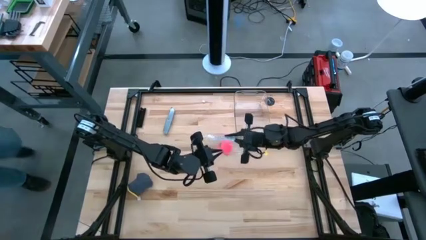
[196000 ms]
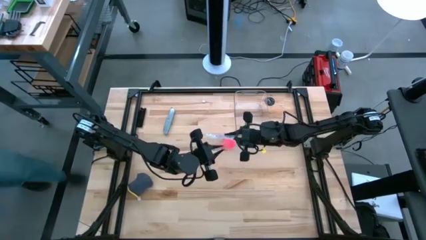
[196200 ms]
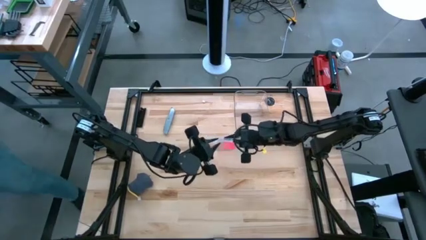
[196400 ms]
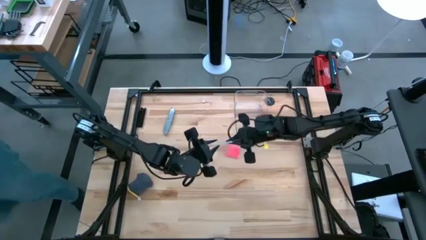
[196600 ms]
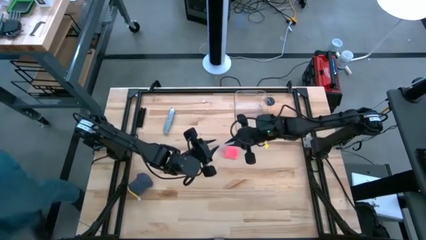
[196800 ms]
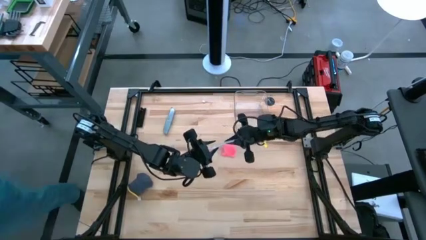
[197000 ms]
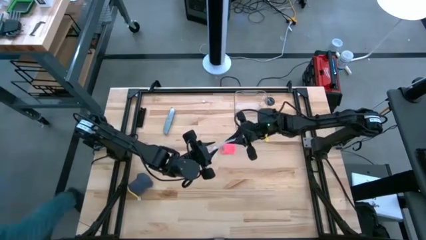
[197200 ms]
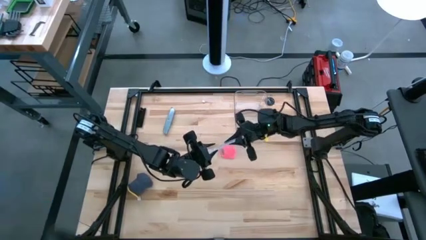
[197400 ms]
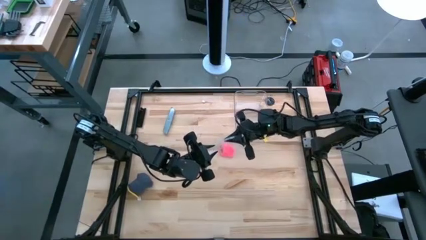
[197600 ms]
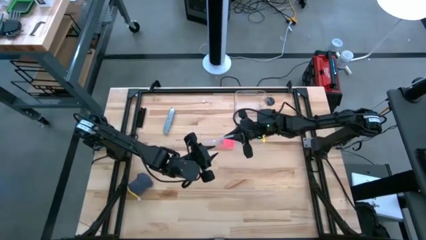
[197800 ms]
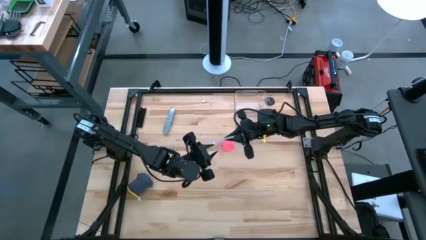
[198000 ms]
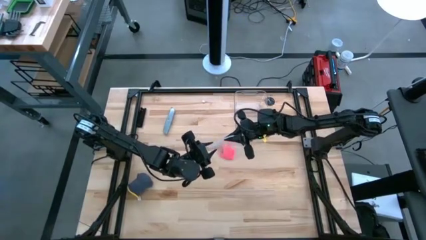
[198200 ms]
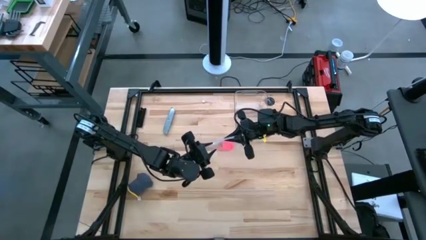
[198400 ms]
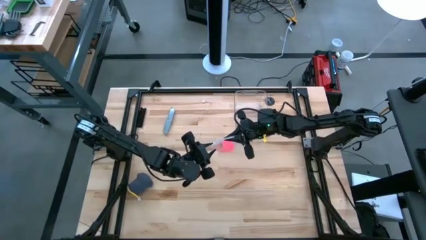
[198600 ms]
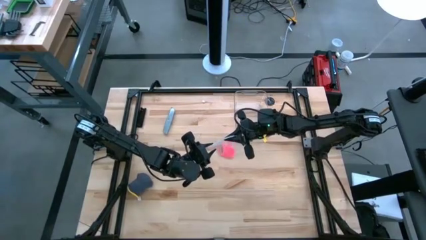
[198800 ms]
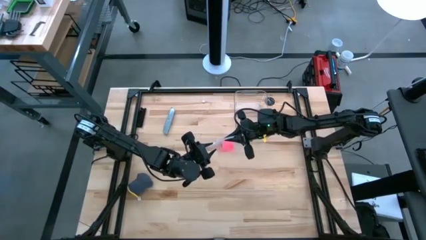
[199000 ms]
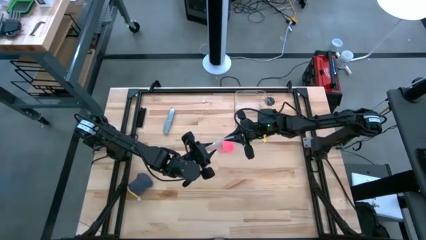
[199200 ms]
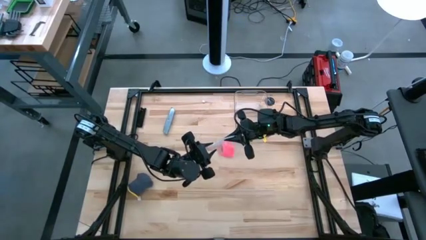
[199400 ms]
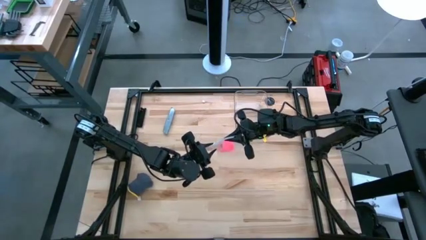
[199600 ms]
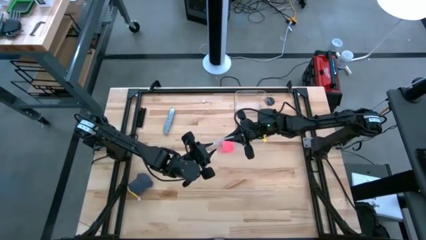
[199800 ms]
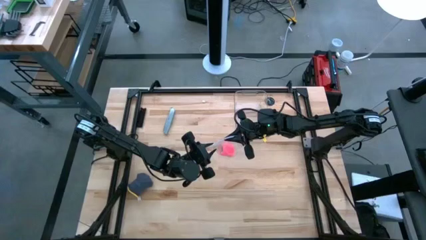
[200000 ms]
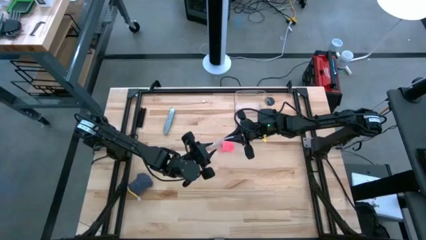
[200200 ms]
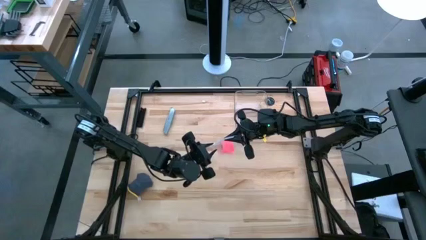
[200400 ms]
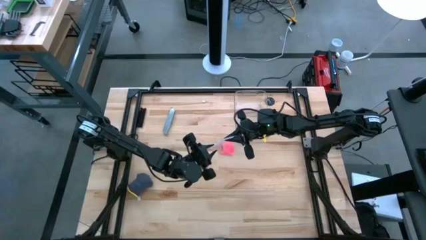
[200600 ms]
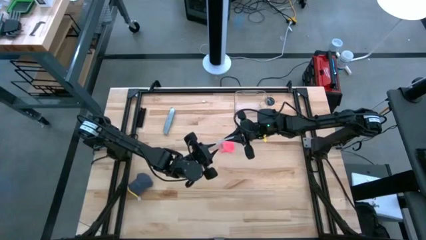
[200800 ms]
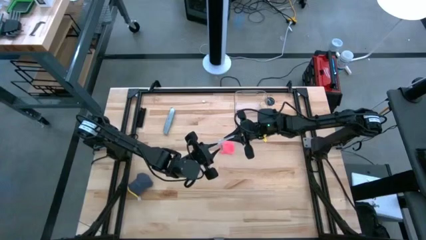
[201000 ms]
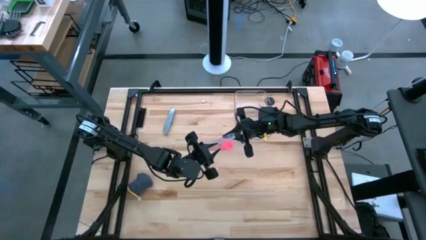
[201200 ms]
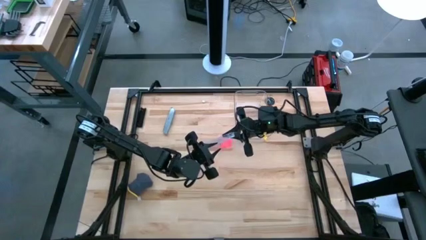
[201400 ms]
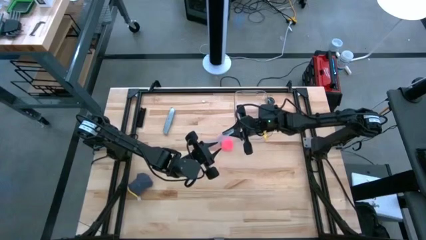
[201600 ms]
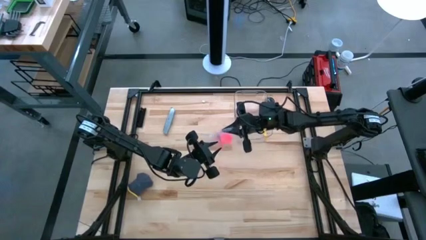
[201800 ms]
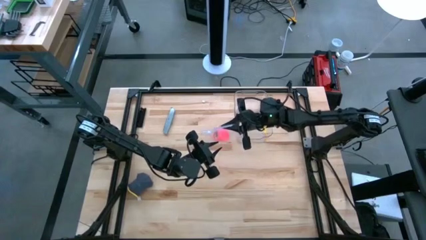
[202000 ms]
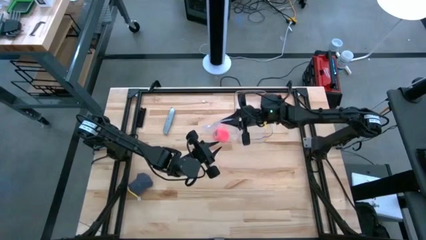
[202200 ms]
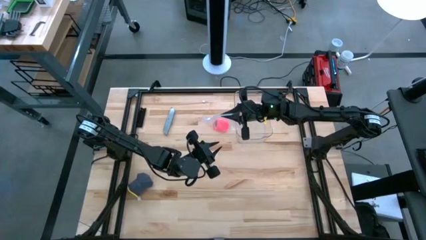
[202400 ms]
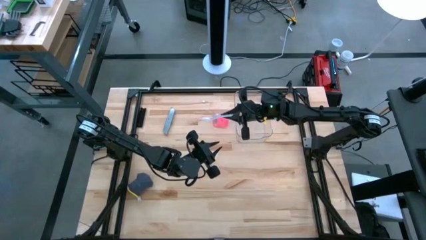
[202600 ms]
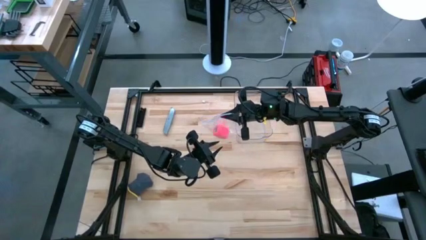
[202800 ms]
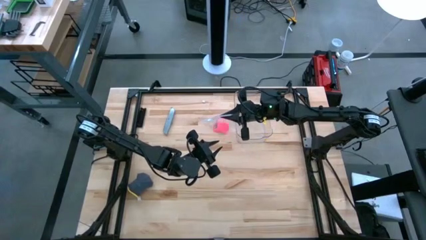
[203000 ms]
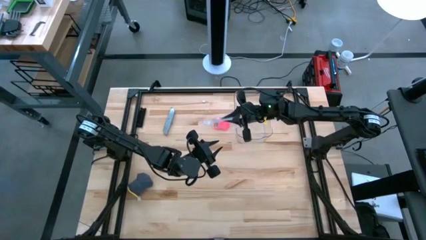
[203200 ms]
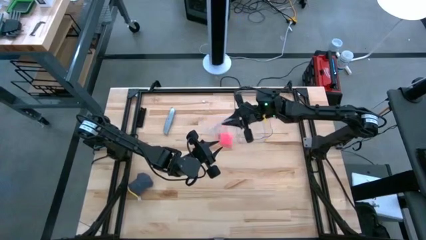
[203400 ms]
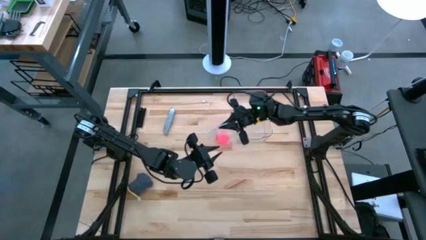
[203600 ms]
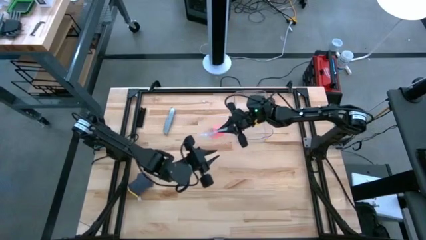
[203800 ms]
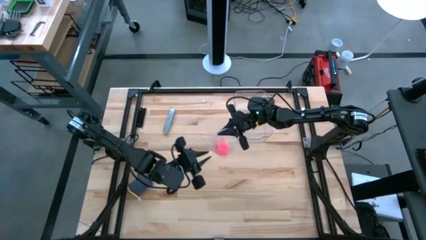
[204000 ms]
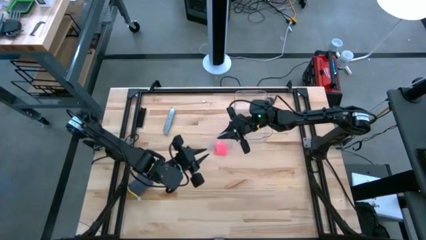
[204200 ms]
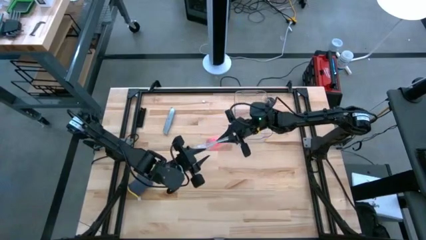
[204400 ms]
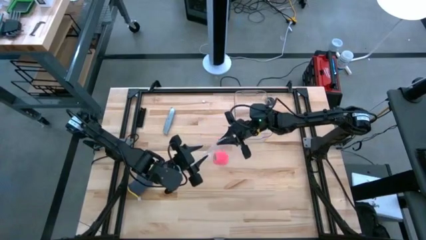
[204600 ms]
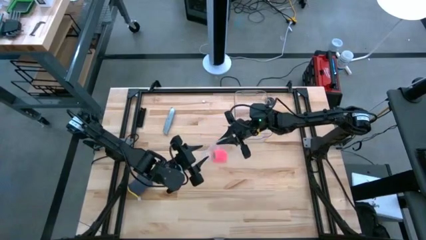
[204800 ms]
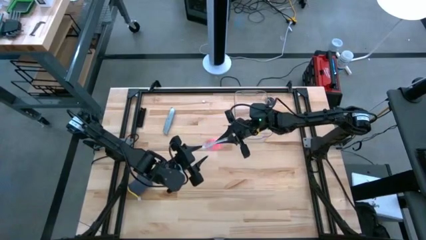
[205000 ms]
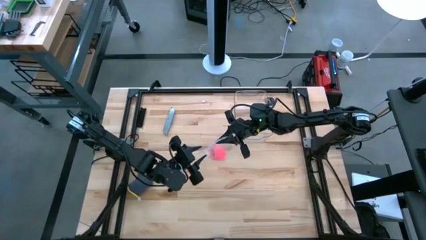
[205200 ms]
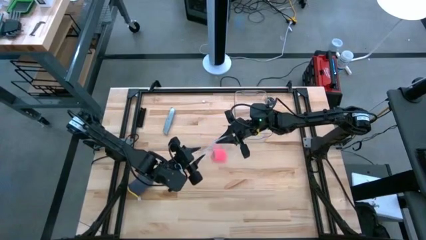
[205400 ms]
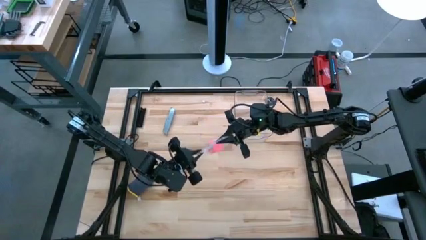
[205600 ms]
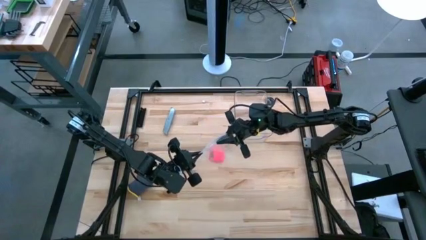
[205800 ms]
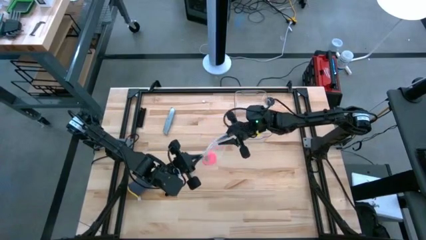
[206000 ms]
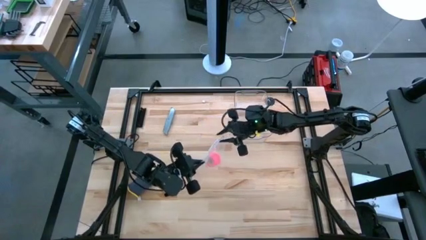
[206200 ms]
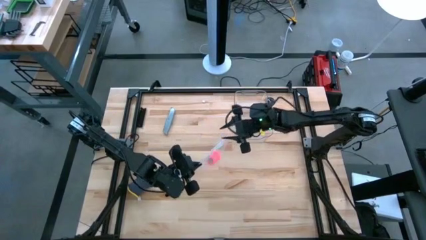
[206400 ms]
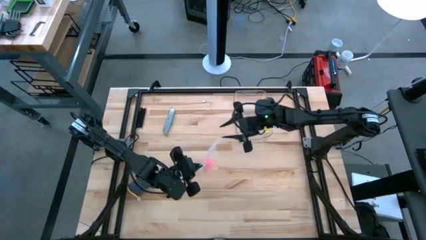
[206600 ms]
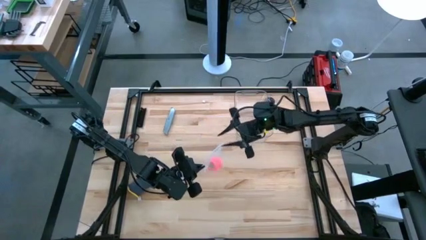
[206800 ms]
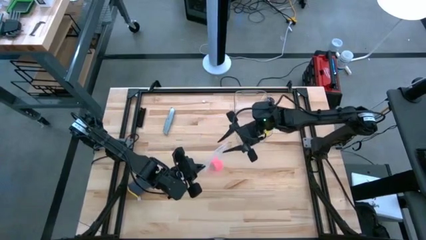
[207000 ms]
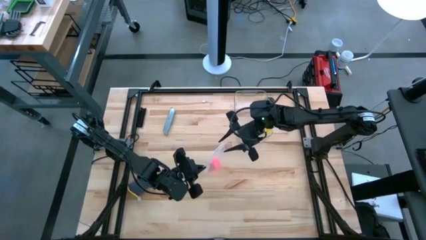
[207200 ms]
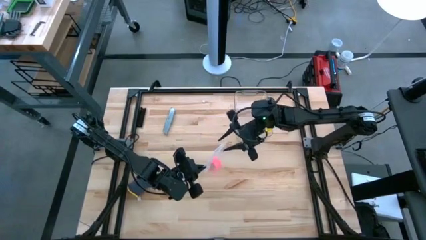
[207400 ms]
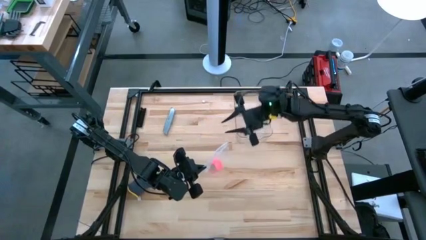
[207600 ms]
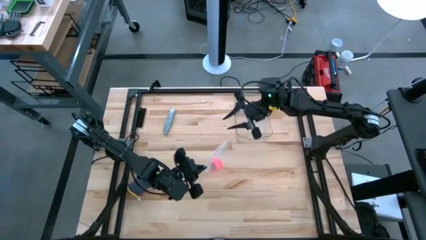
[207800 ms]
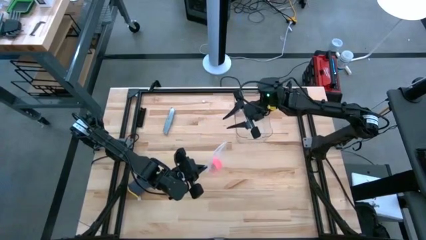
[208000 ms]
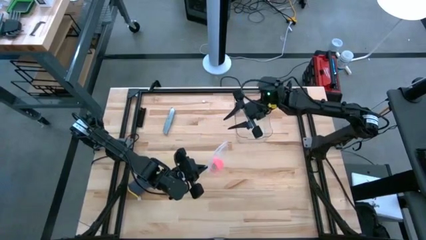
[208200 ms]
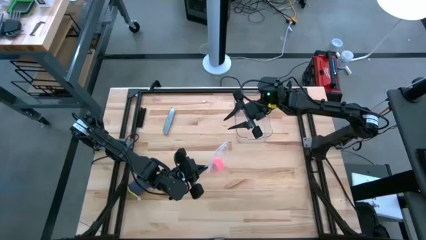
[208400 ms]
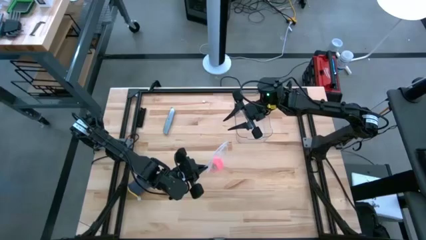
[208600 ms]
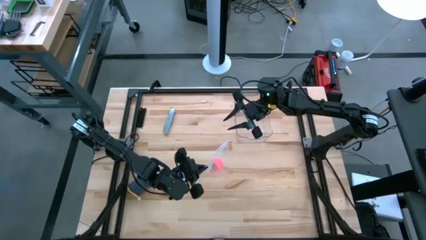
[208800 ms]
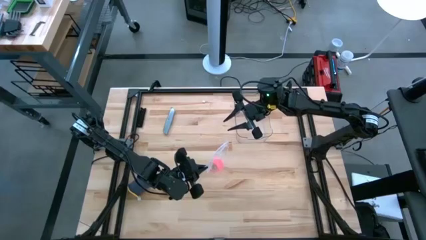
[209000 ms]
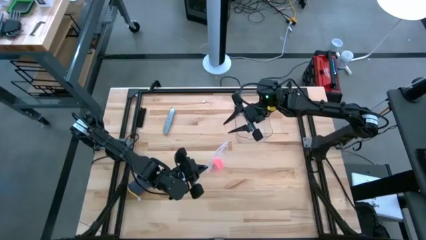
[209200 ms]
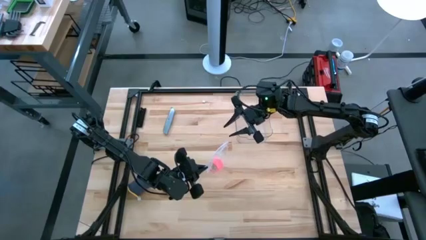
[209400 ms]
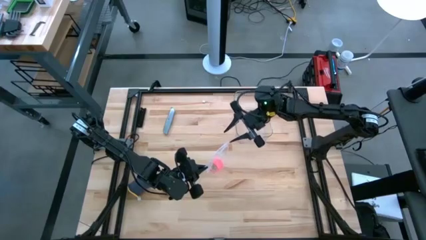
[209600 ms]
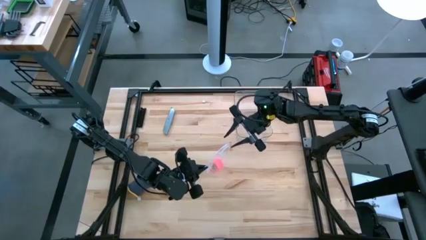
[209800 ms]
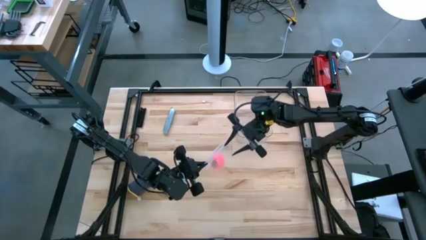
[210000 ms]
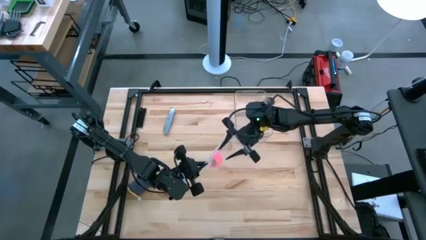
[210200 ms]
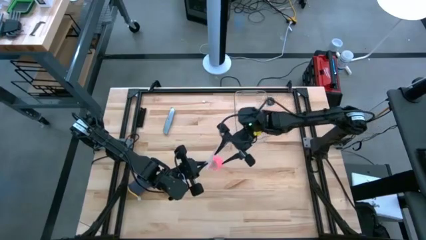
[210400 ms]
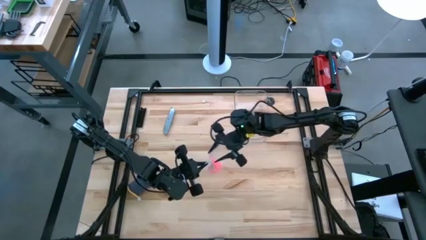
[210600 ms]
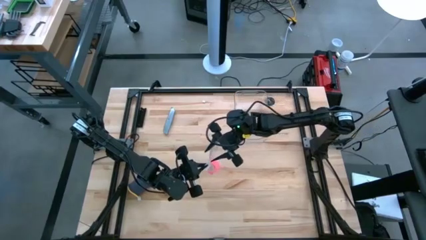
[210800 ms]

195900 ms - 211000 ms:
Task: Roll bandage
Close the transparent zip bag
